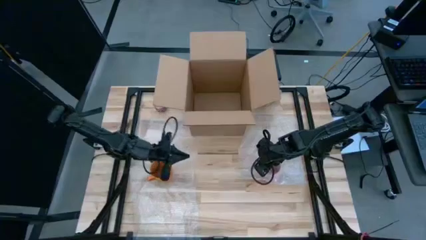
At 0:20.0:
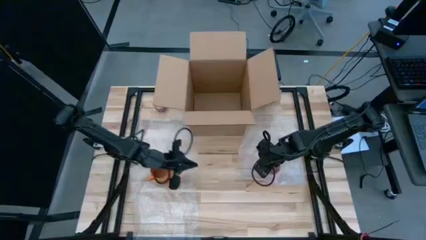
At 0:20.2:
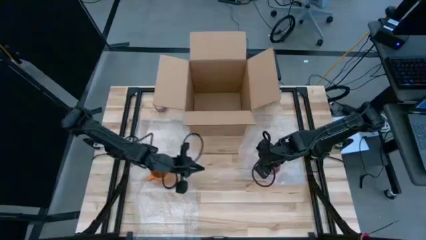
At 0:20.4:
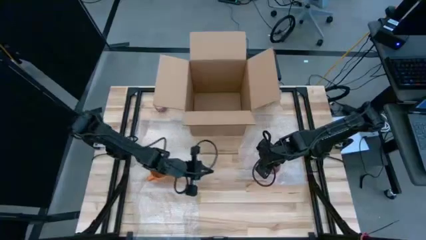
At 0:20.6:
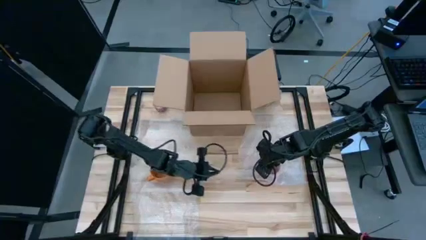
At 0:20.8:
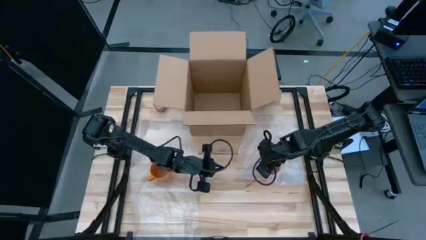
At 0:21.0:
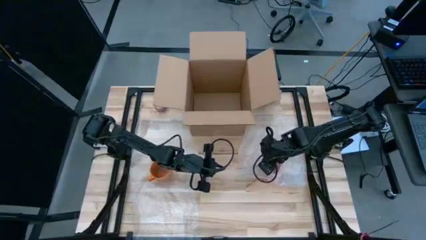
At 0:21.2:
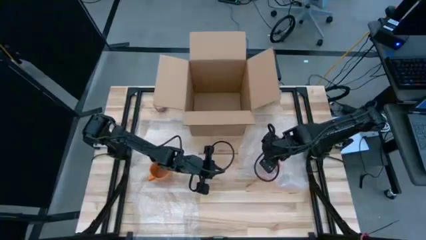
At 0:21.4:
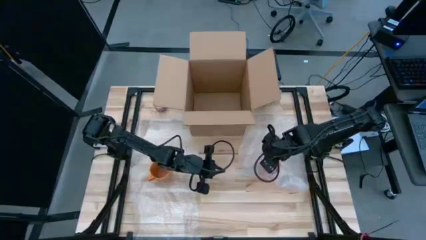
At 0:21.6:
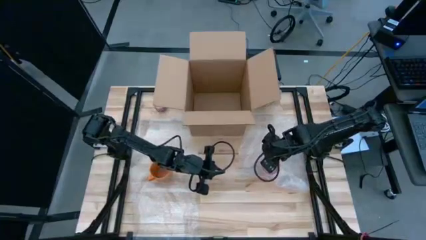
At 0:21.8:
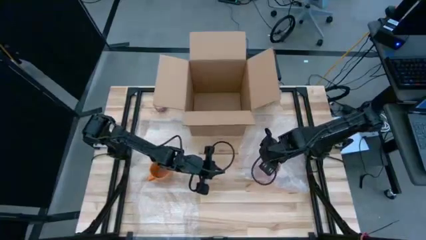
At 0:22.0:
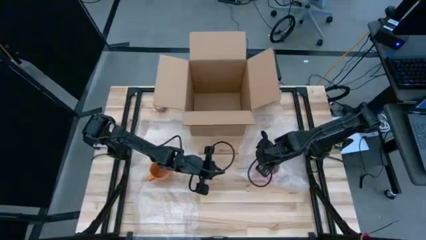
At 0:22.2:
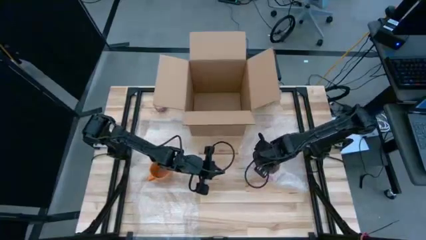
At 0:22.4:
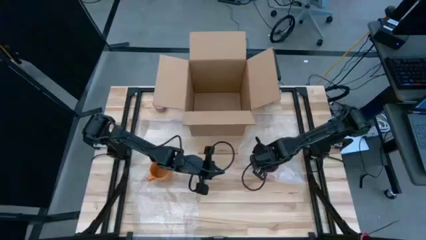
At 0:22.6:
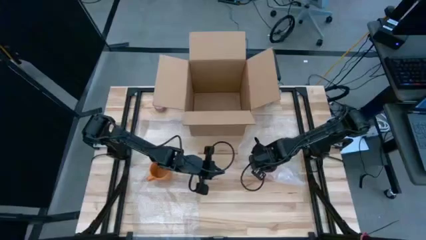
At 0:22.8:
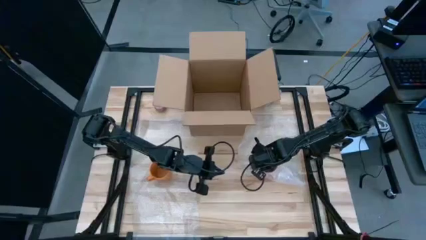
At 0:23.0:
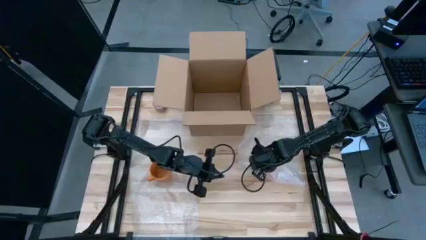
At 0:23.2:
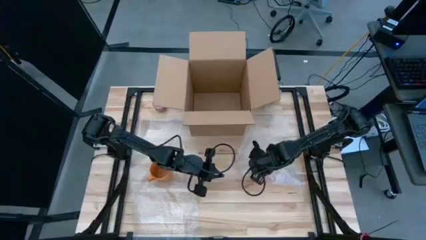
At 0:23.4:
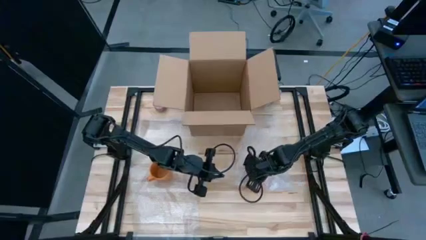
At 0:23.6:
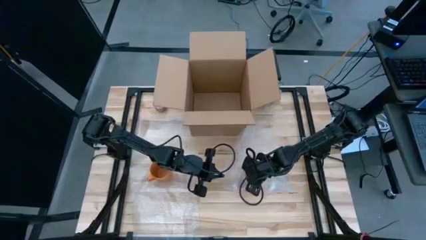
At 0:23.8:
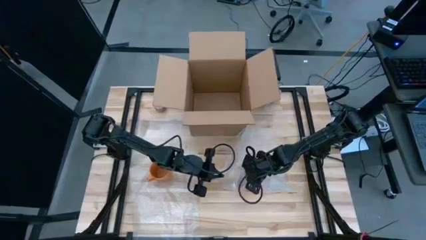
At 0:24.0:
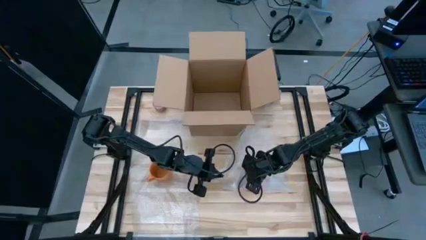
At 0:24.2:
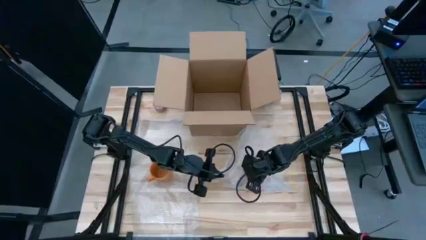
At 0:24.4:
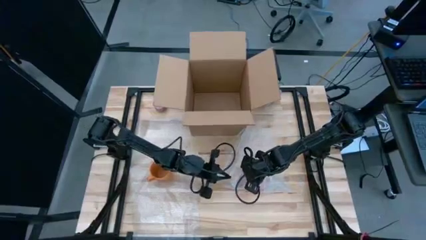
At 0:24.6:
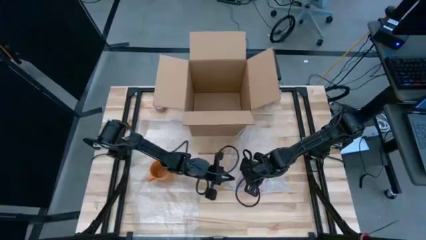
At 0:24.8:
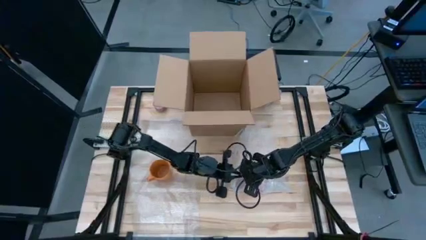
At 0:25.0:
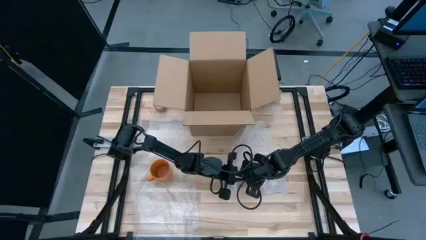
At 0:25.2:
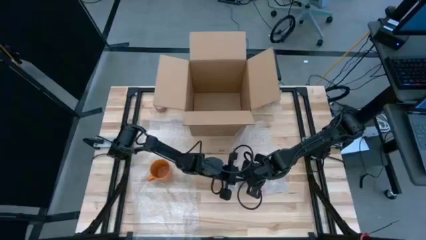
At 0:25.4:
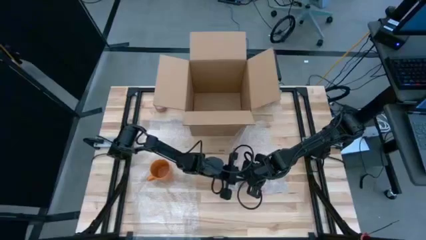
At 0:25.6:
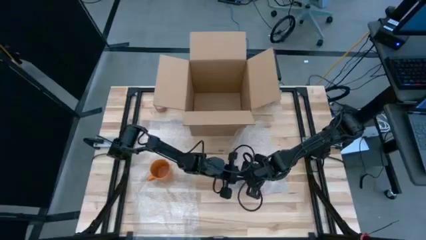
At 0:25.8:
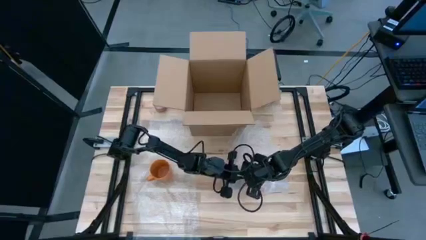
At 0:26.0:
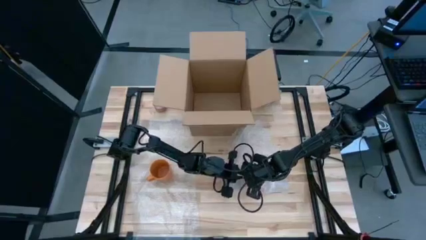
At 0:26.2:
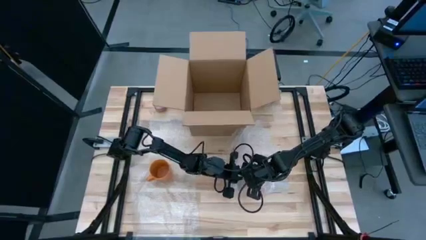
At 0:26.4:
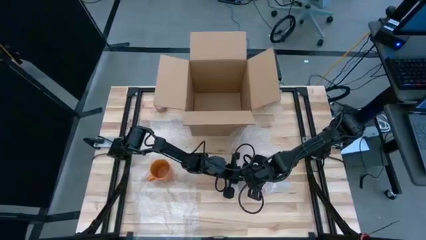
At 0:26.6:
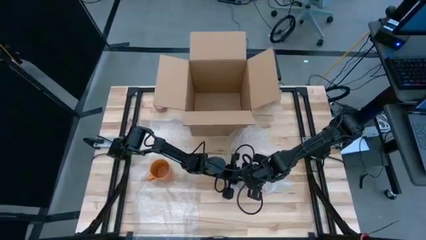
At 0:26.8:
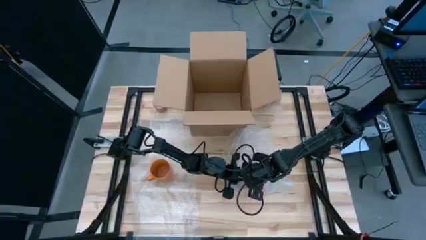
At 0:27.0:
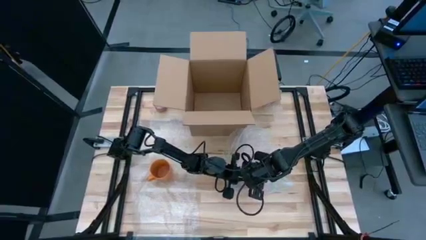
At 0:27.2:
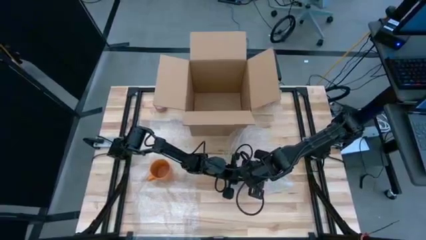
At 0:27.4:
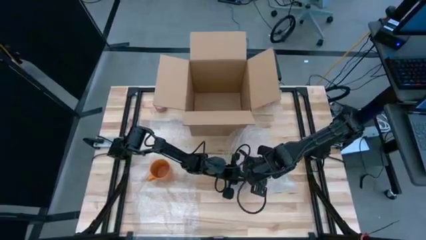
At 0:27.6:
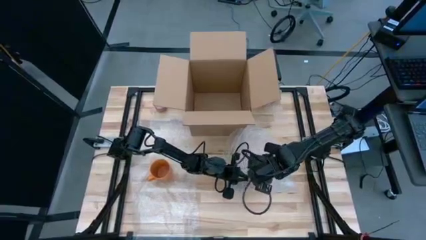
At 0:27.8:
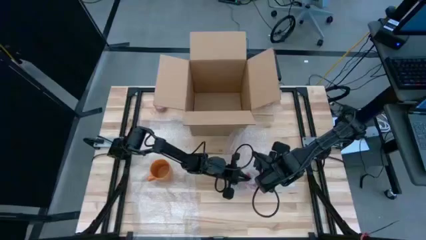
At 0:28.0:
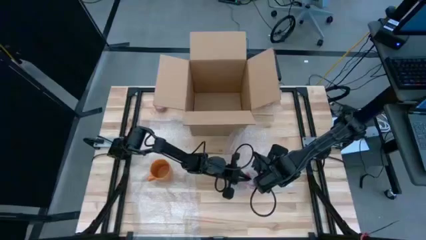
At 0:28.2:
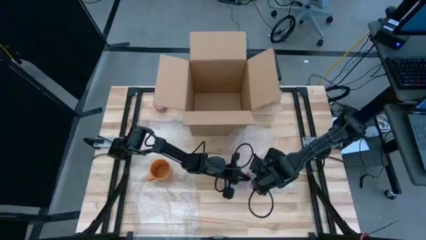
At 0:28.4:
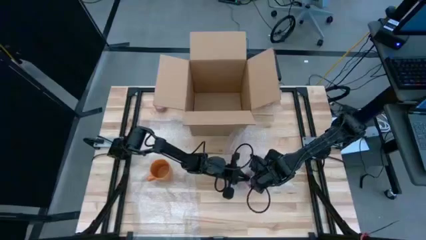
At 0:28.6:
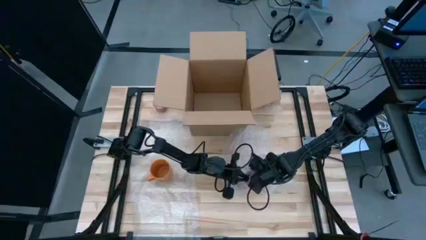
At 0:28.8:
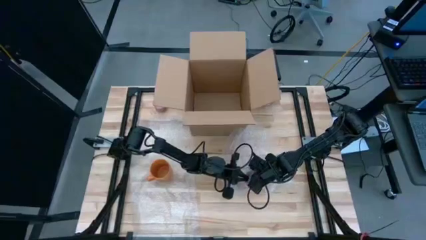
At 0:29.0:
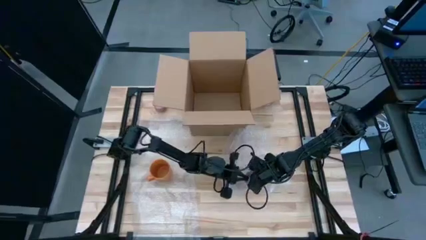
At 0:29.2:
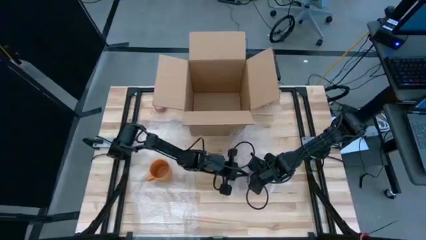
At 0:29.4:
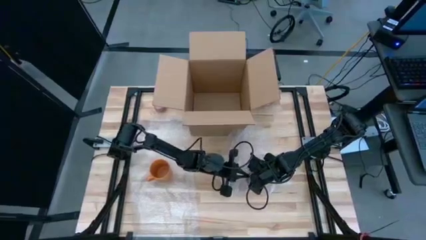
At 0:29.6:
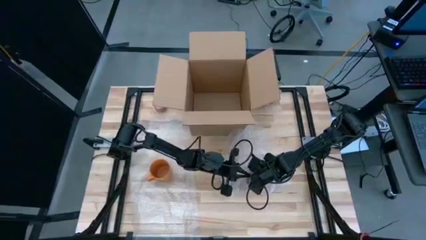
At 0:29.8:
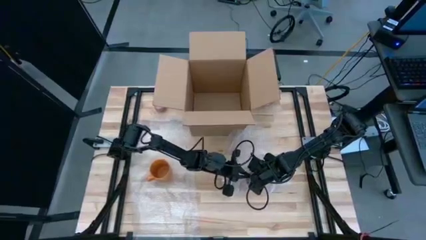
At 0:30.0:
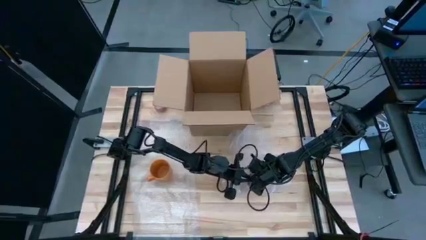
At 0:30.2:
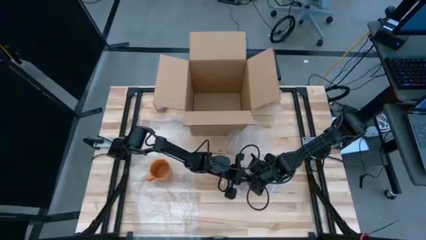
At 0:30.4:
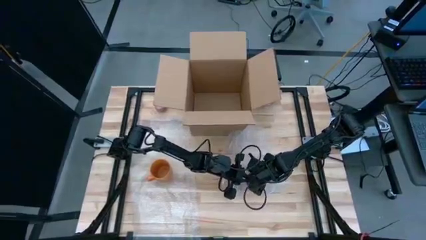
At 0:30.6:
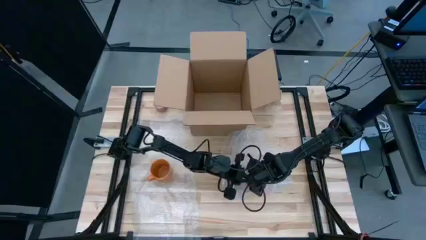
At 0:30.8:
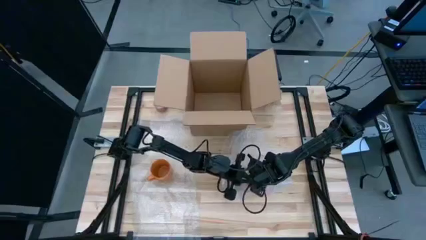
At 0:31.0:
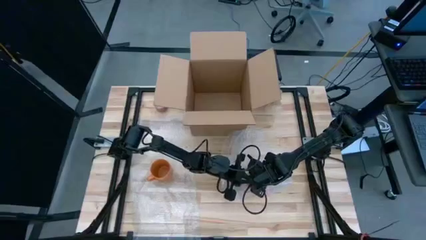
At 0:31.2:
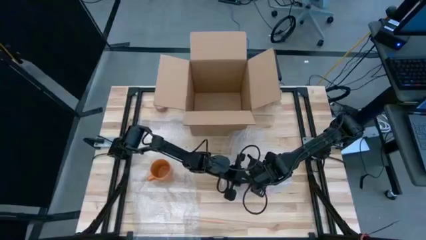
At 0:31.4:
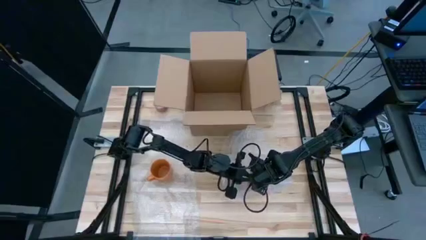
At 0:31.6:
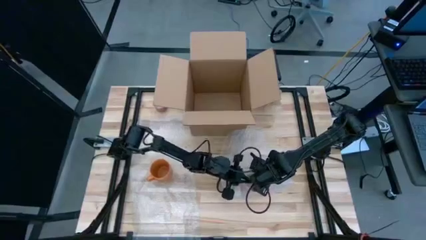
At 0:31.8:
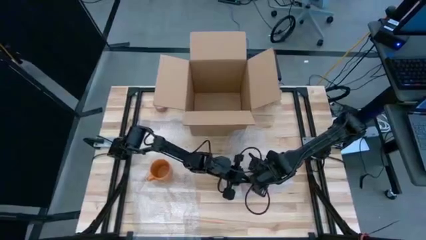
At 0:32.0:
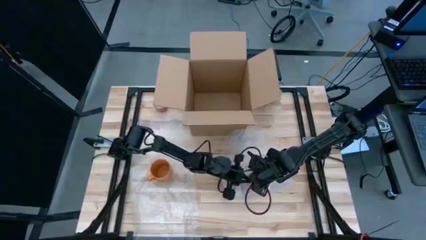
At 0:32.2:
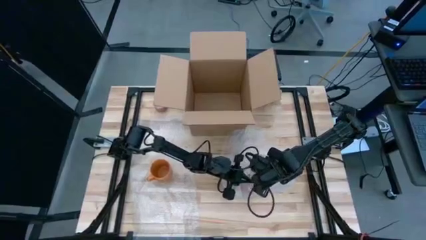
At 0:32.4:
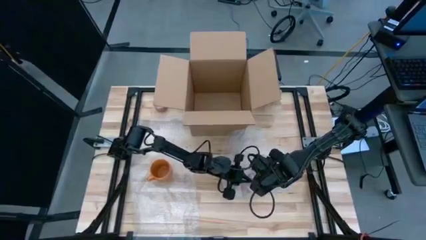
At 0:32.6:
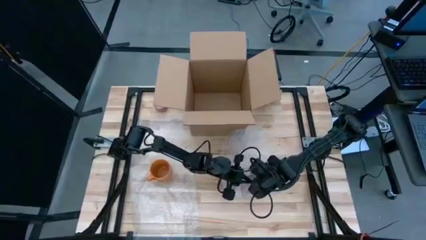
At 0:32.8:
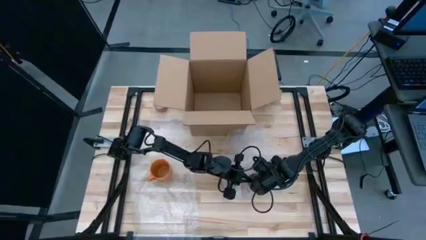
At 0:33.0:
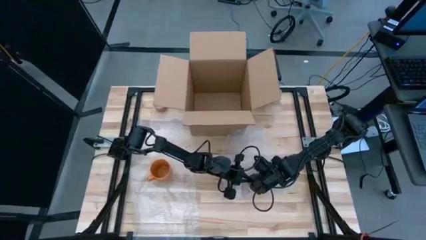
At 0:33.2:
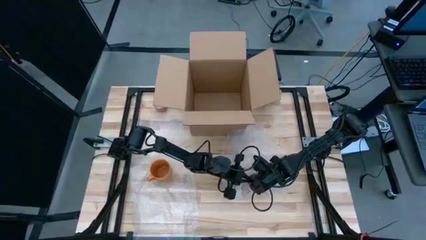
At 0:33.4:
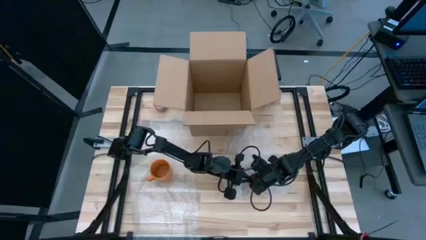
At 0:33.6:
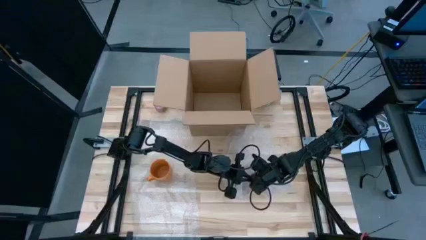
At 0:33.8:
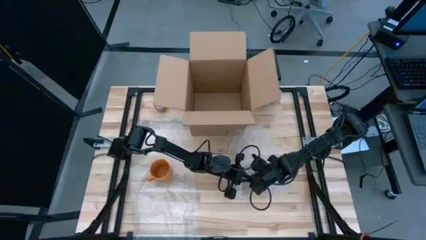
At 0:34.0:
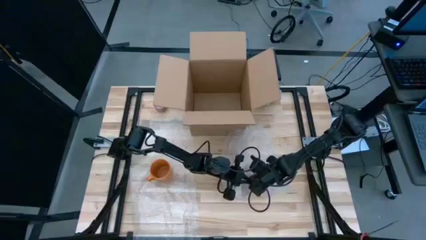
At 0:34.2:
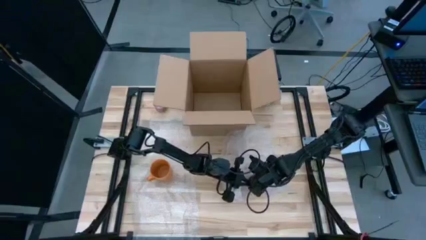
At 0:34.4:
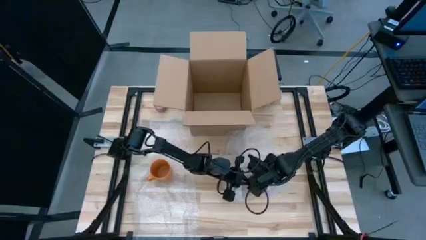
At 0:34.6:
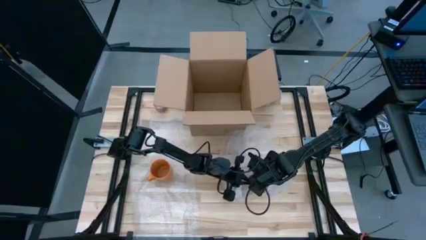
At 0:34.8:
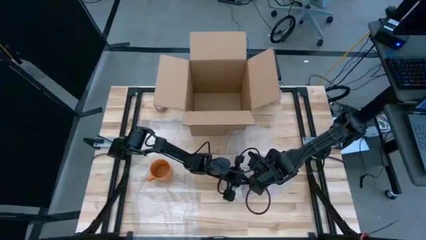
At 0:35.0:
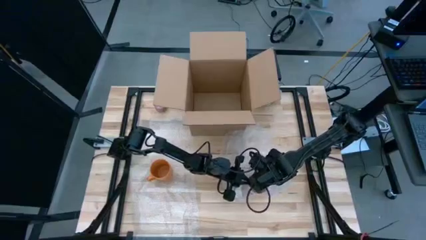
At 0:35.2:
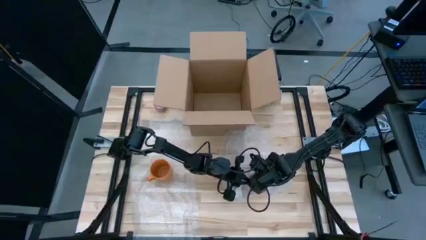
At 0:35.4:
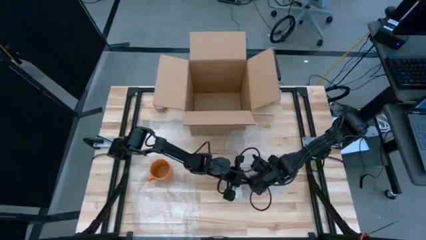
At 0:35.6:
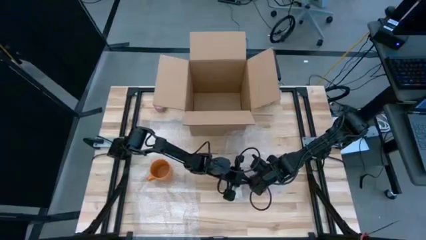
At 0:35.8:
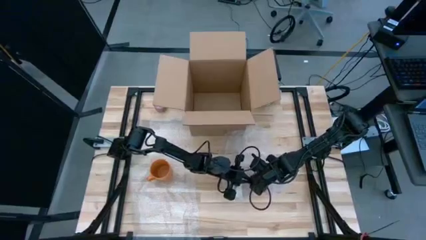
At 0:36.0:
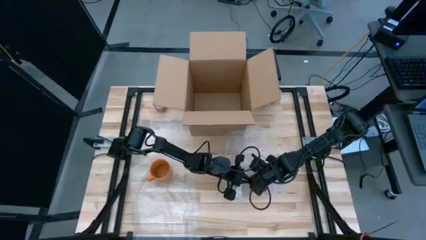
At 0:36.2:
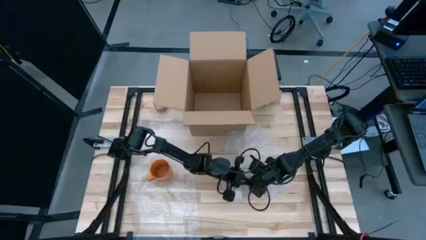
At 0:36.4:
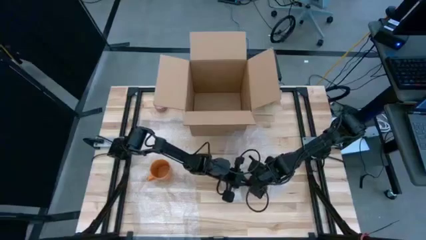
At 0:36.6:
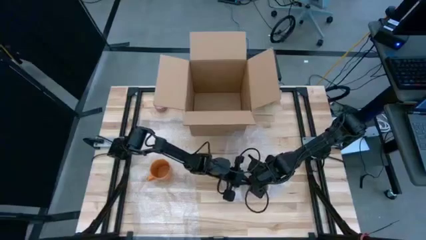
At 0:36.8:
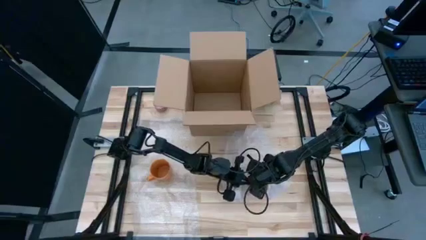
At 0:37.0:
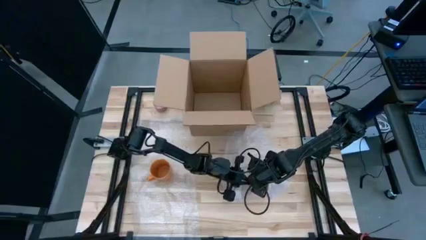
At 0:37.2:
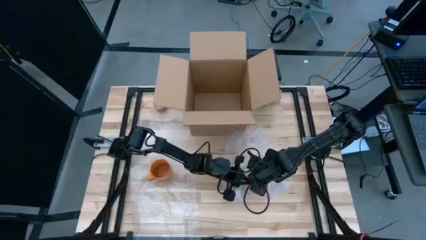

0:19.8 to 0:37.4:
Task: wrap mug
Wrap the pink cup with bubble wrap

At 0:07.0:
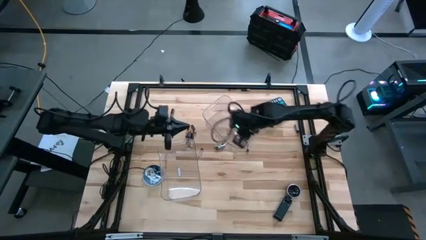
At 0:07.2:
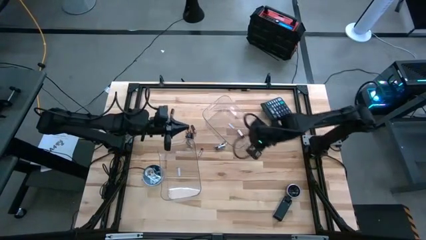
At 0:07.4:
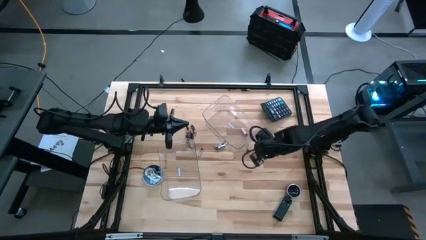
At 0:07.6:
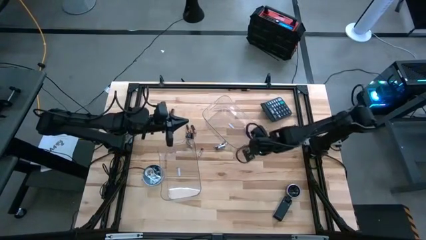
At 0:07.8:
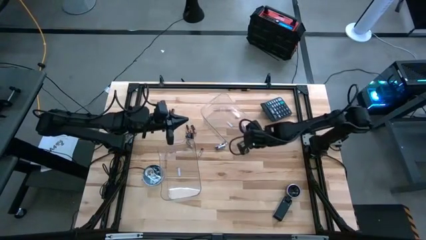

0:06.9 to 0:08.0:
Task: Sort batteries
Adjust the top transparent bin
